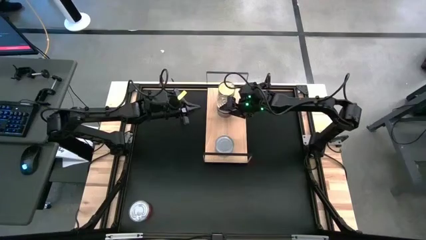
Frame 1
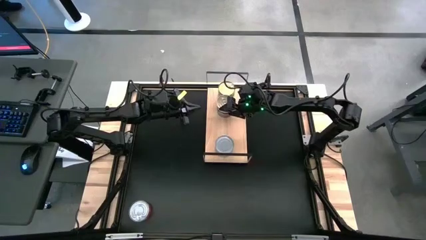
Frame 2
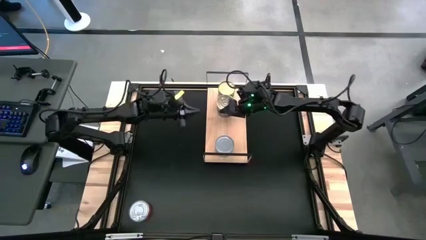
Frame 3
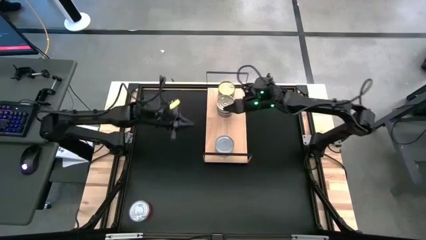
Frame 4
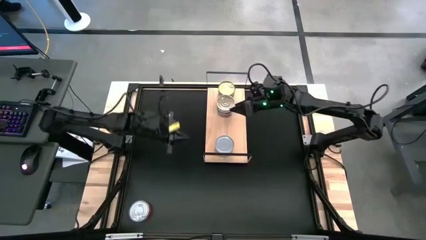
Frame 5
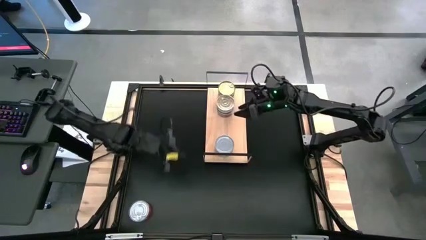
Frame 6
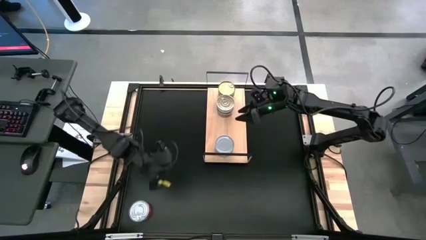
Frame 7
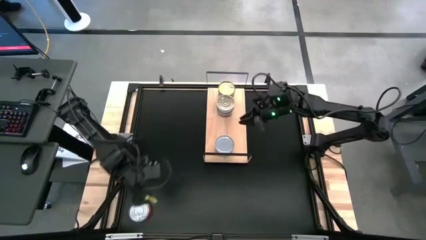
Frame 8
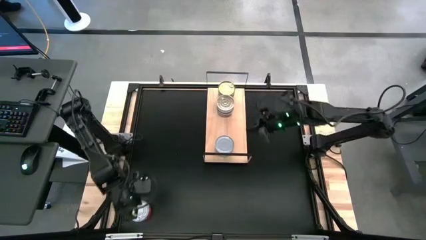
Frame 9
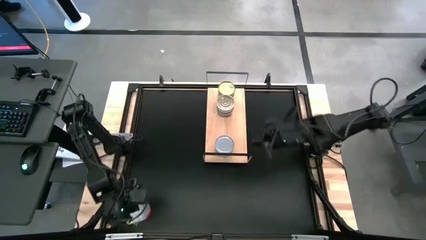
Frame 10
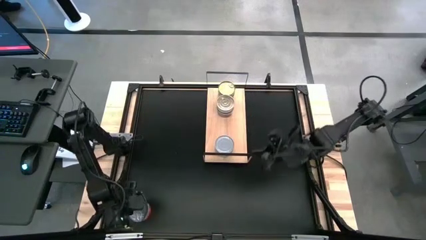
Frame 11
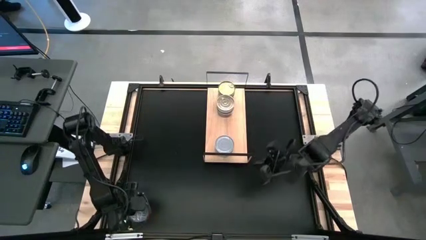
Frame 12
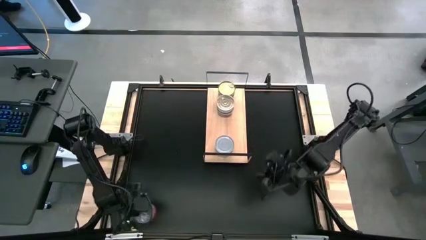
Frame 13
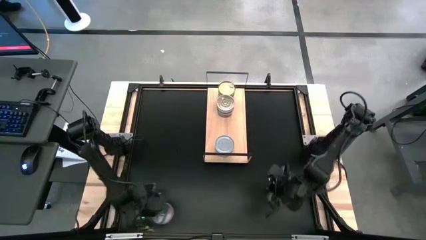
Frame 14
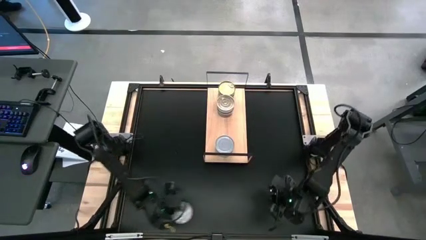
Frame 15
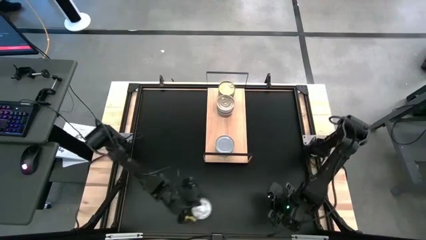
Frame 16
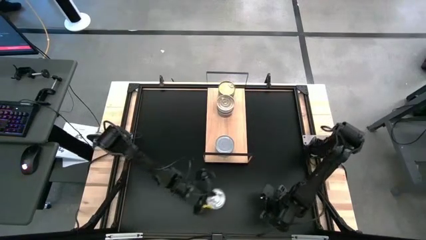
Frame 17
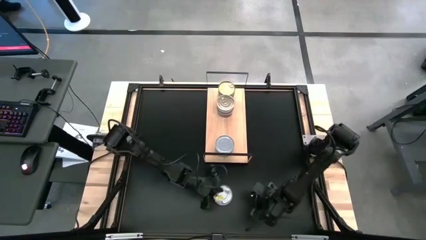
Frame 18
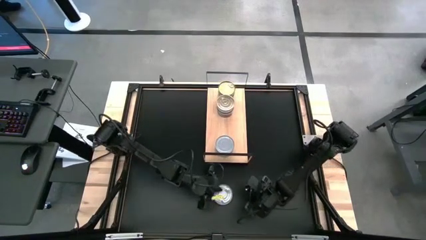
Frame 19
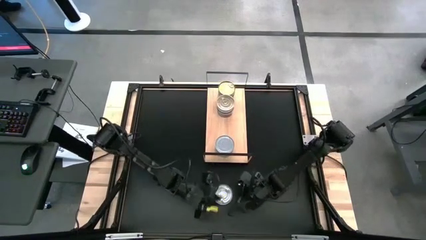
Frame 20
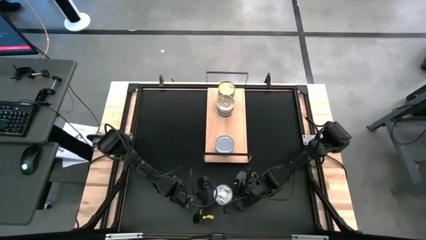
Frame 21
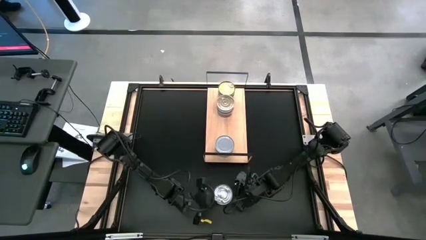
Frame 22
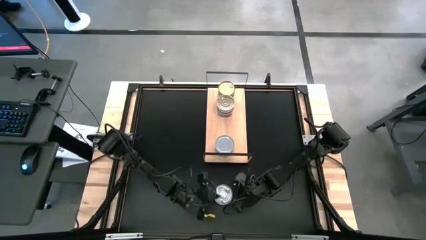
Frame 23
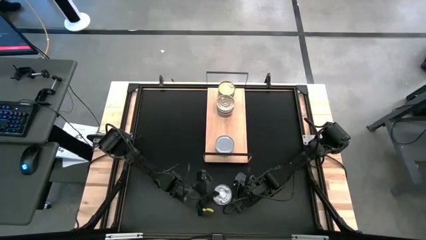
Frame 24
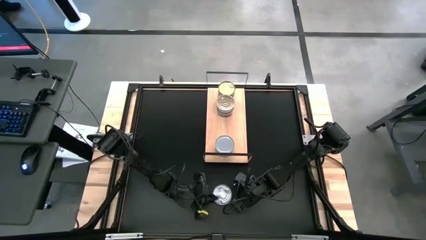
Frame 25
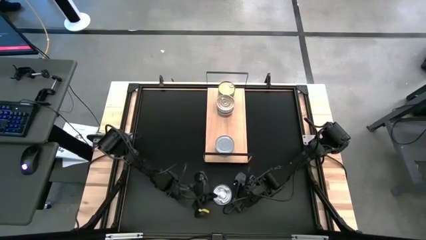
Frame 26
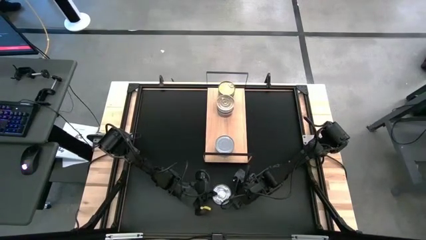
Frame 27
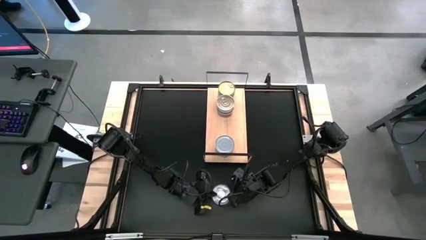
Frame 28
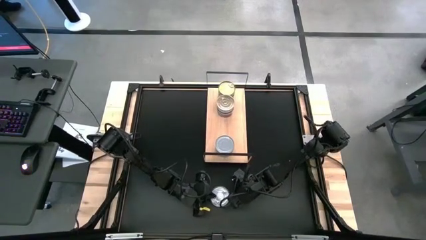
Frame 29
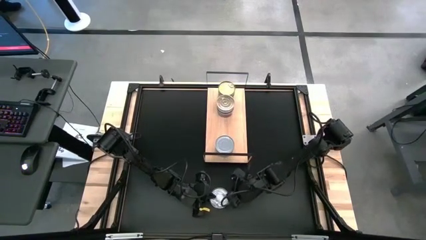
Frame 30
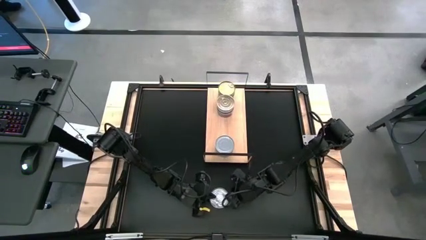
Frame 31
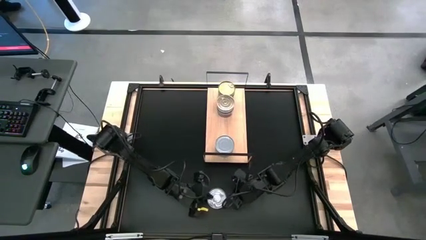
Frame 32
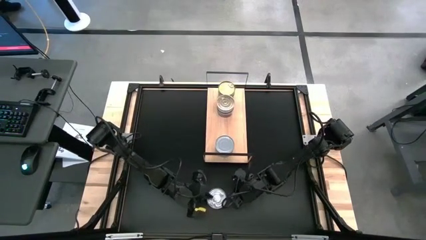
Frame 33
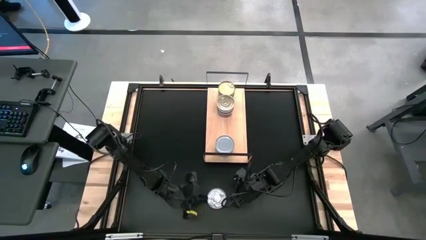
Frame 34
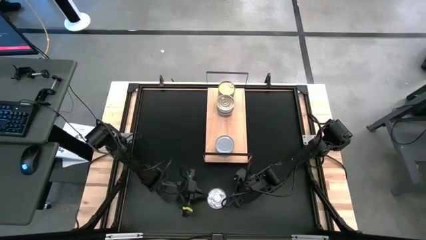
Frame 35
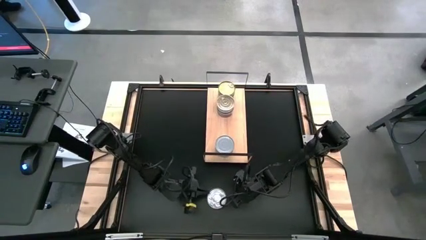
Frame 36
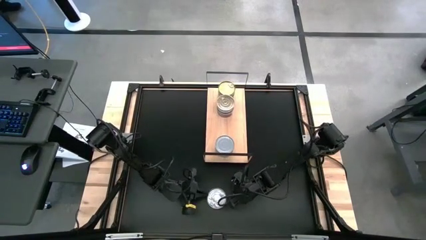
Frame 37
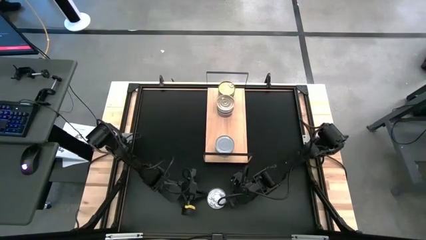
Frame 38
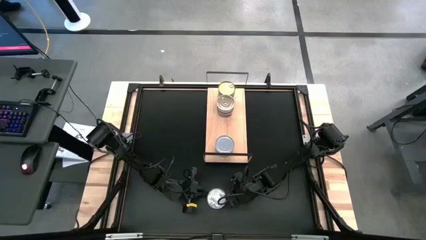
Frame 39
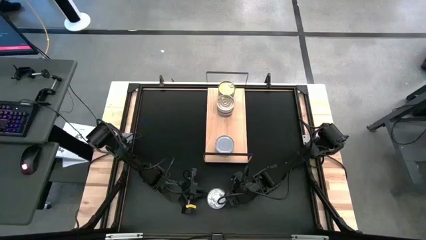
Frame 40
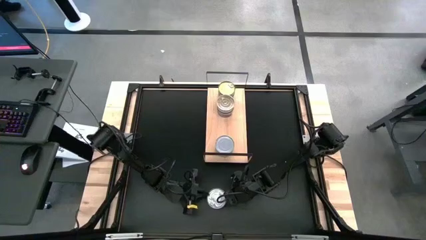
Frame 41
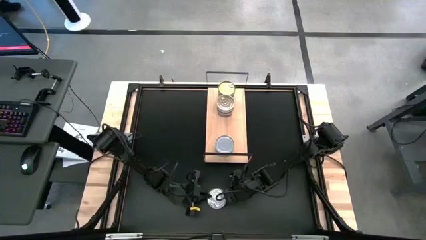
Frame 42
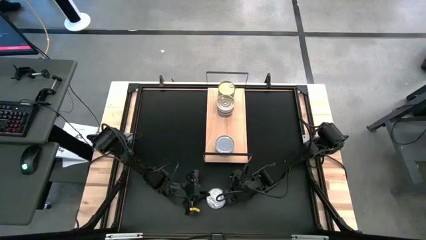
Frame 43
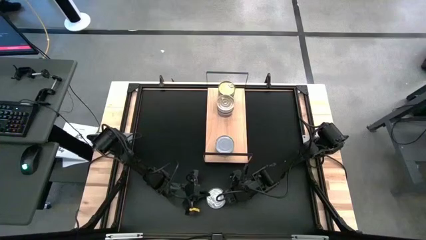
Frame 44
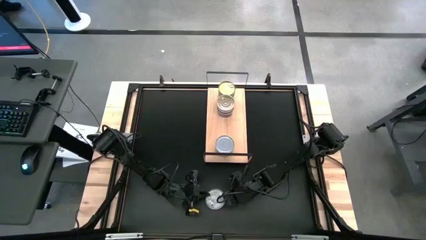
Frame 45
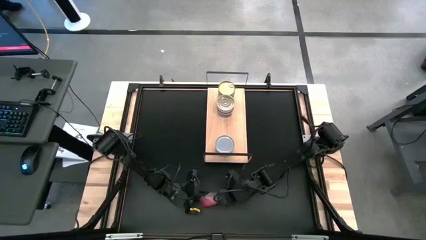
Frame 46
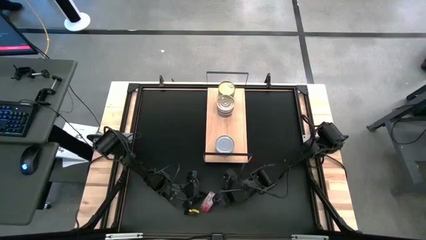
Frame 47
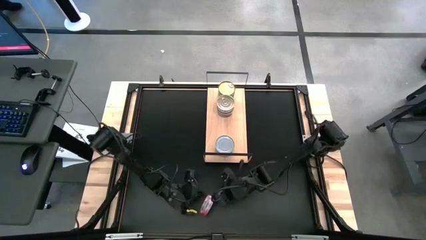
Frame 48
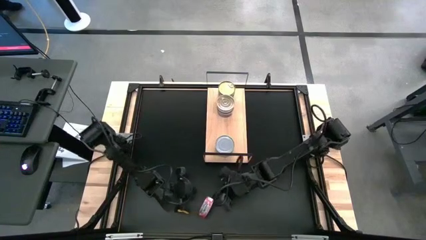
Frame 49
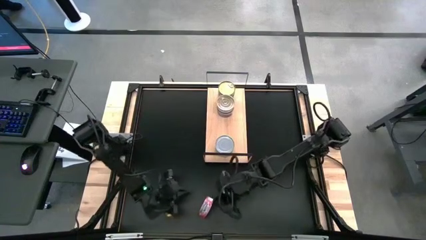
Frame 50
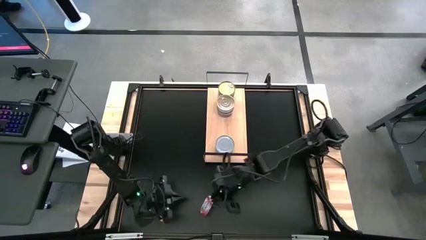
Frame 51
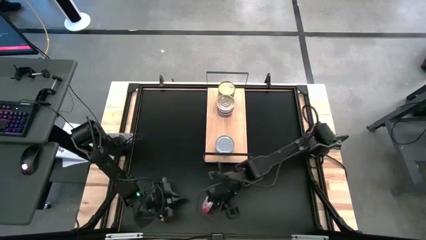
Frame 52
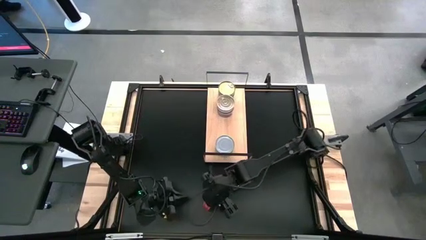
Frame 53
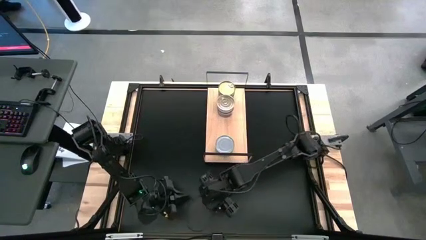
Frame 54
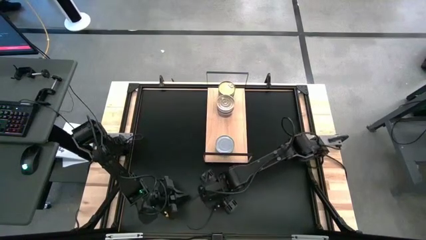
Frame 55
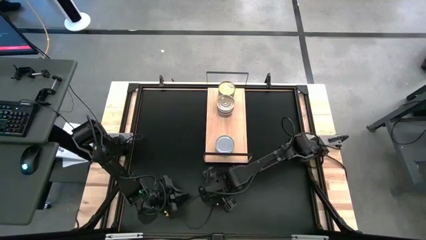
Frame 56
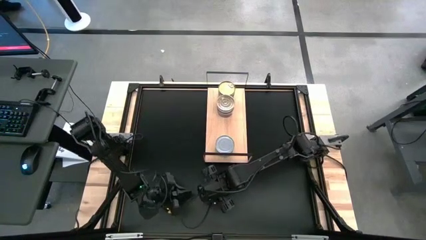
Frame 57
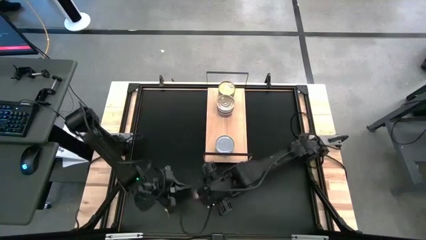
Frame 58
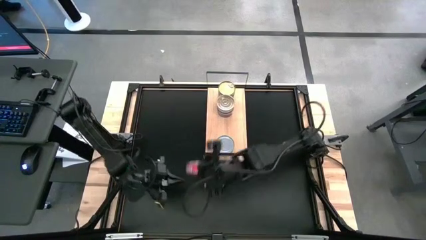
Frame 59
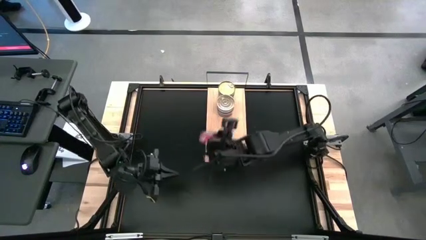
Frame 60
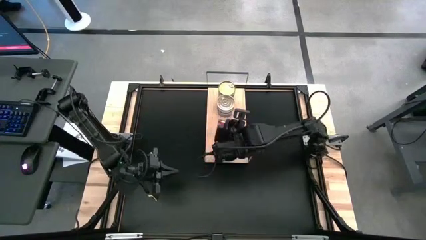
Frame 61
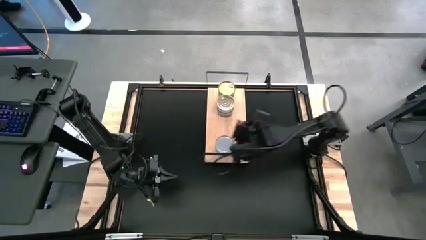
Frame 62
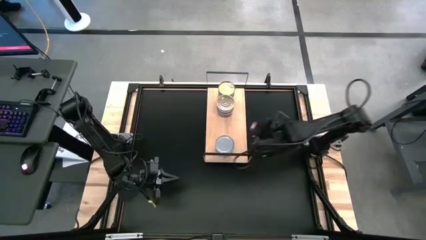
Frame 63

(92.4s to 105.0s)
Task: Stack canned seafood by type on shelf
Put the red tuna can on the shelf
